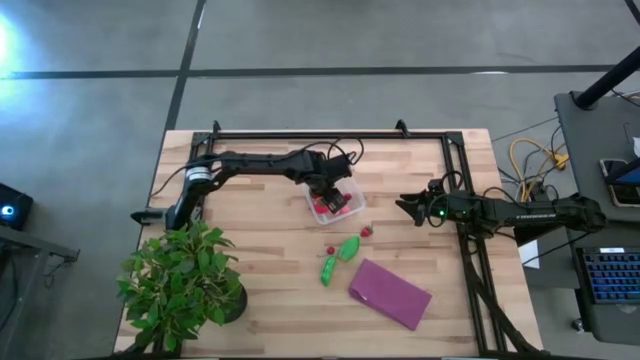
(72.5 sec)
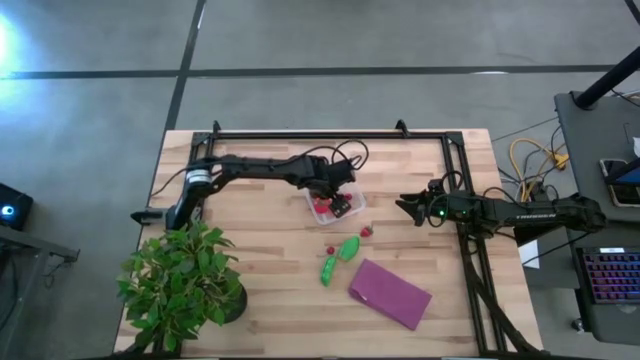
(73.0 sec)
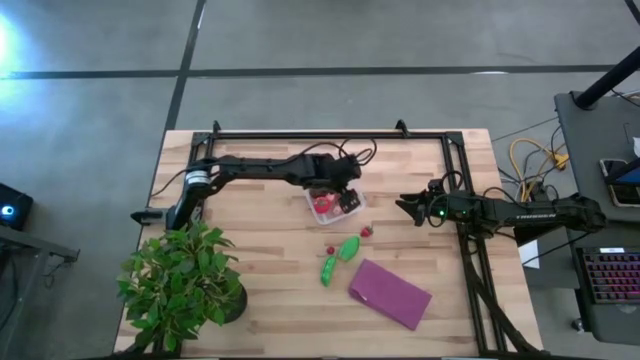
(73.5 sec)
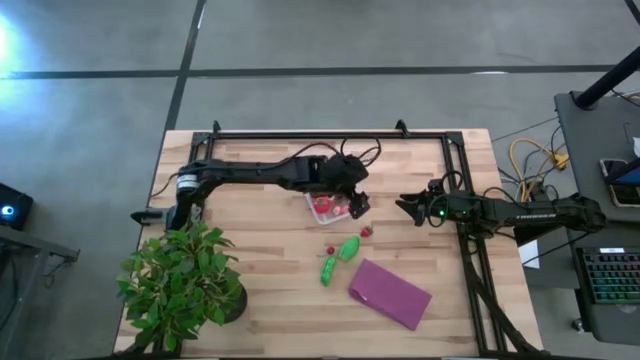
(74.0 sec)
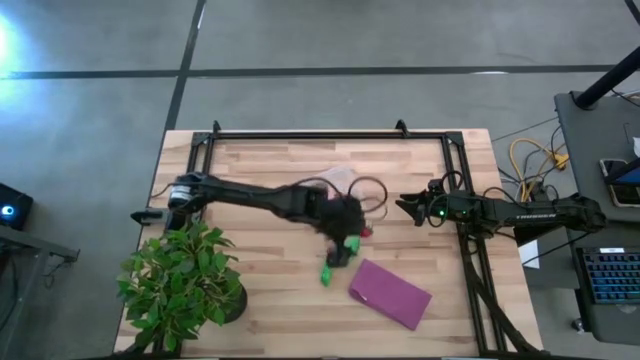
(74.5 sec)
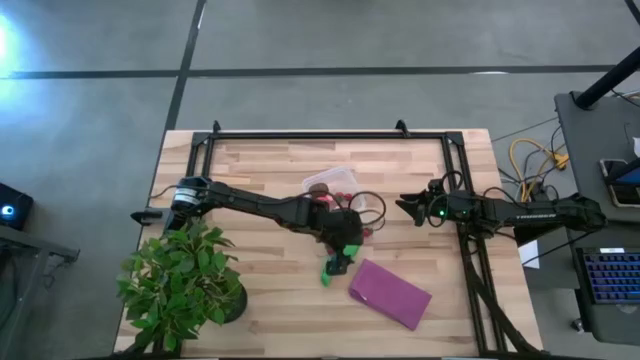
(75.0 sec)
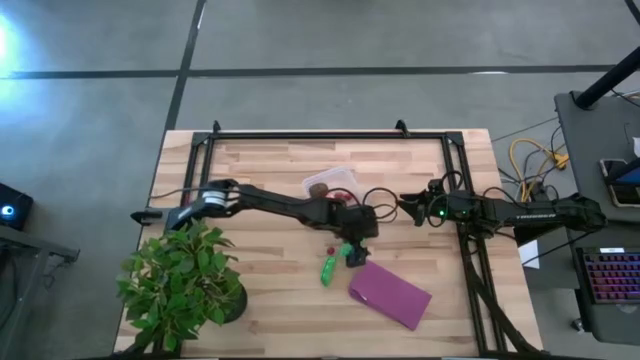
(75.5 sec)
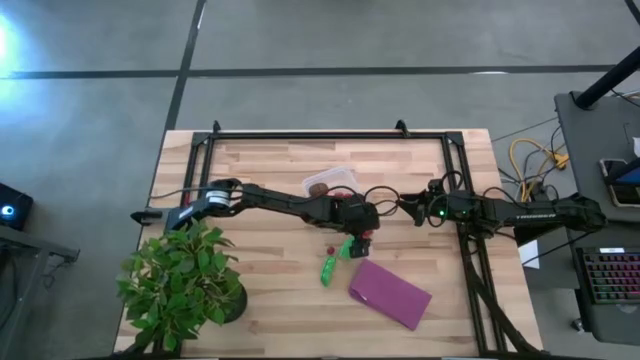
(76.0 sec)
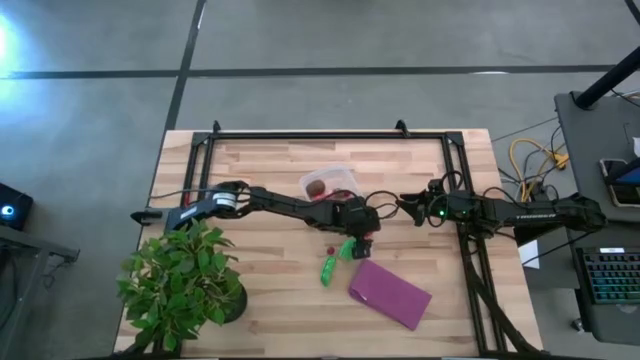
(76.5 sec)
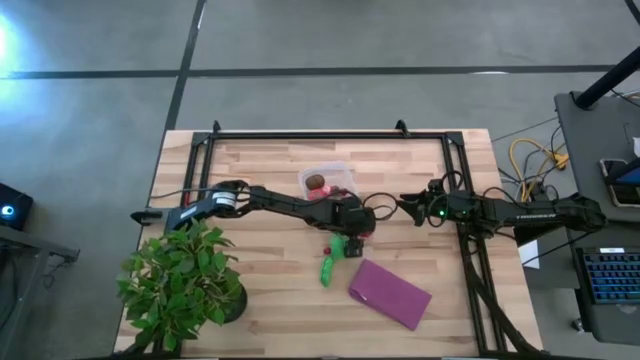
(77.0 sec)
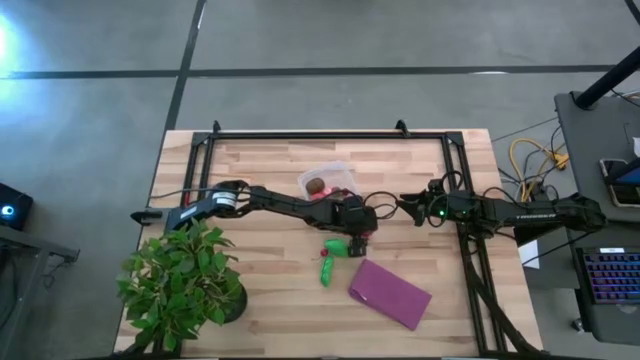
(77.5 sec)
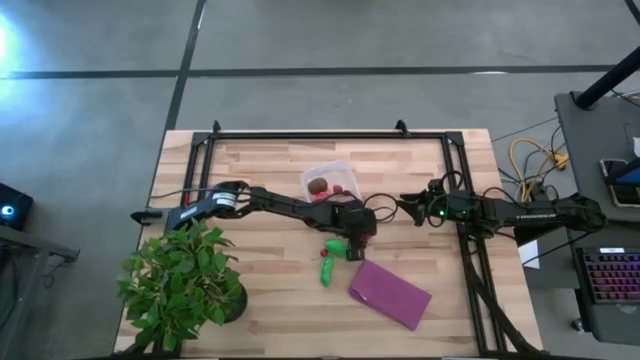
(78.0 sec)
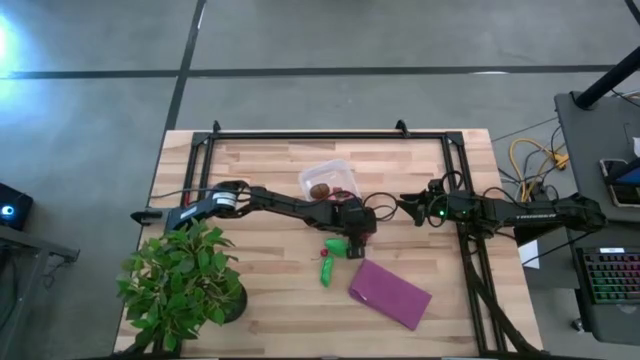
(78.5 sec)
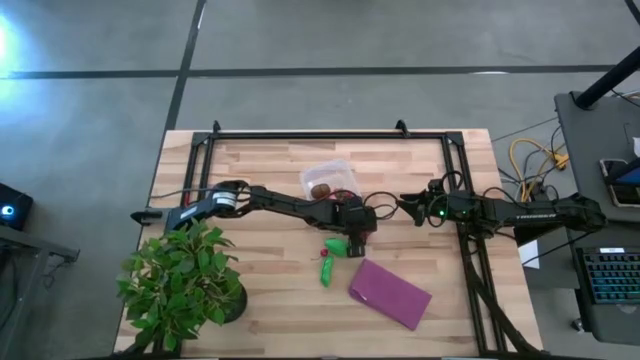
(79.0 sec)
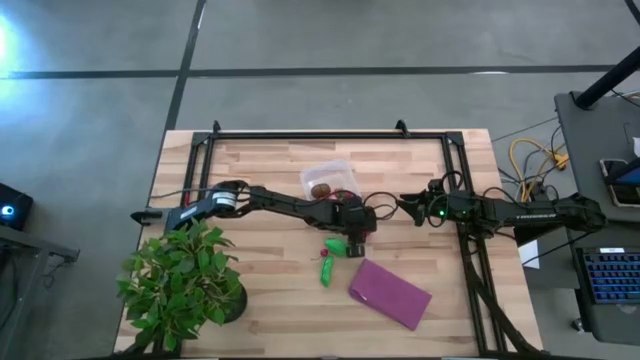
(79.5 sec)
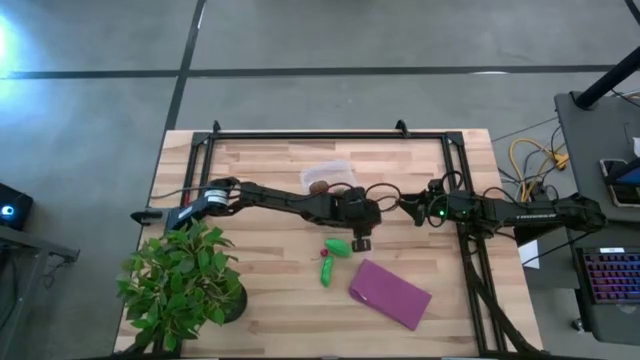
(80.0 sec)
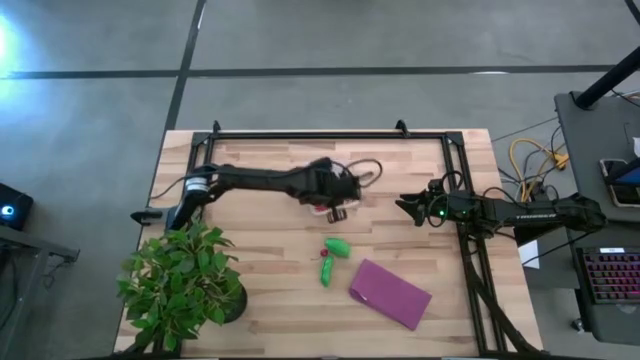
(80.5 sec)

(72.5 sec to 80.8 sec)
Task: Pick and placing Produce into tupperware
Put the red strawberry into the transparent bin

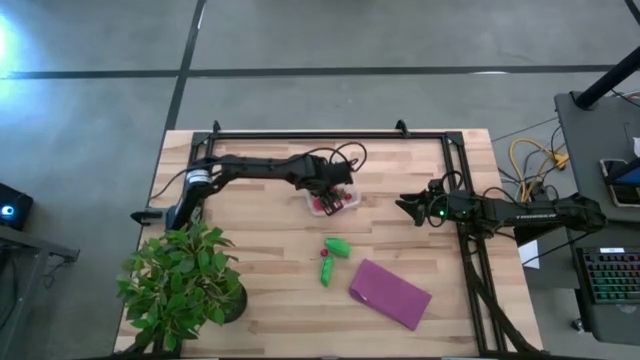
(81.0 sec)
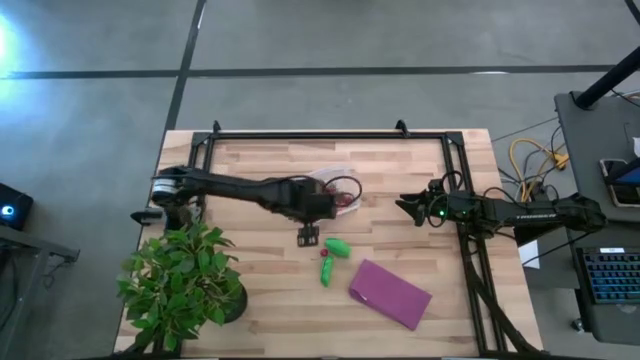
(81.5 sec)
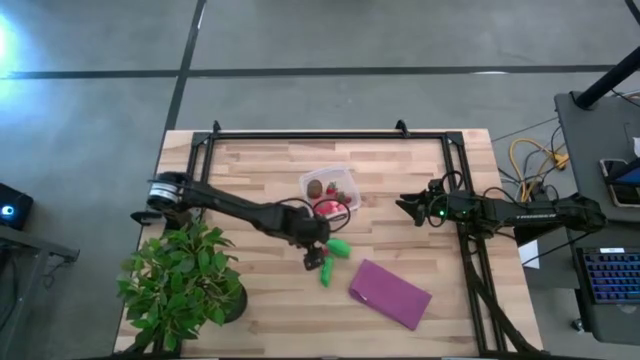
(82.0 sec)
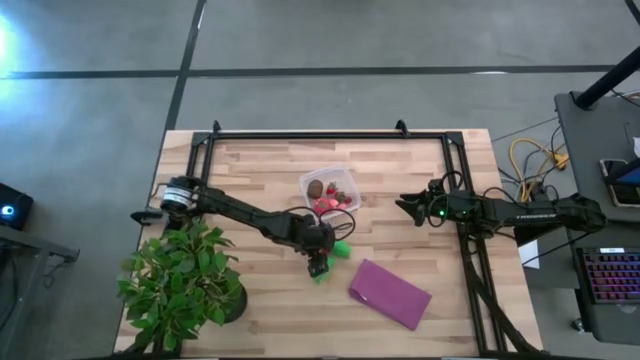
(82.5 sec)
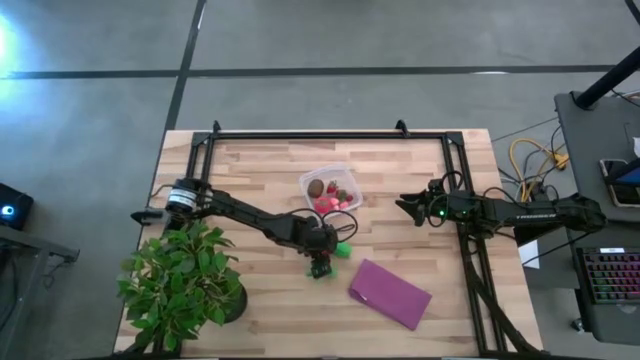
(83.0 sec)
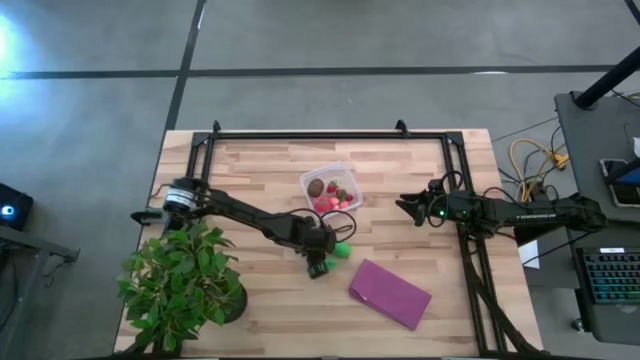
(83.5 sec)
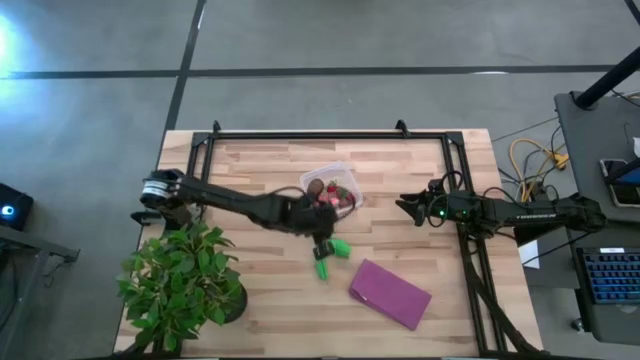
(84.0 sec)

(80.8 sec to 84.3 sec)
Put the red cherry into the transparent bin

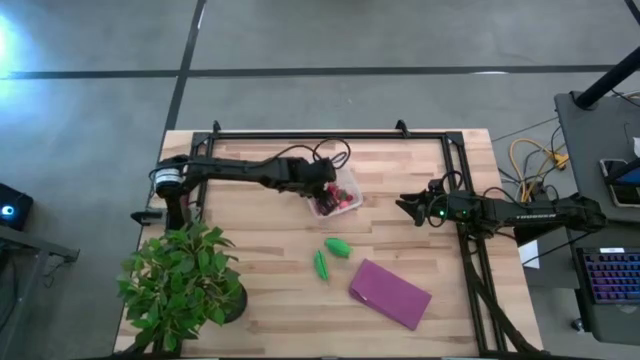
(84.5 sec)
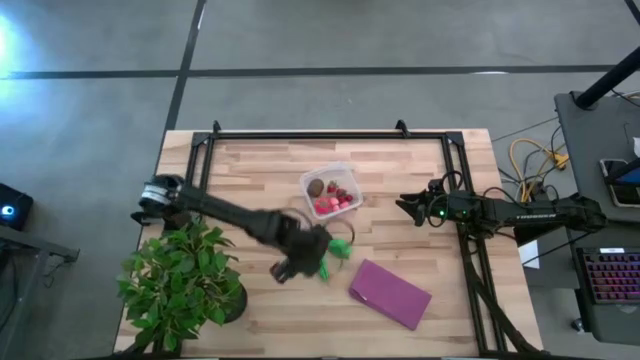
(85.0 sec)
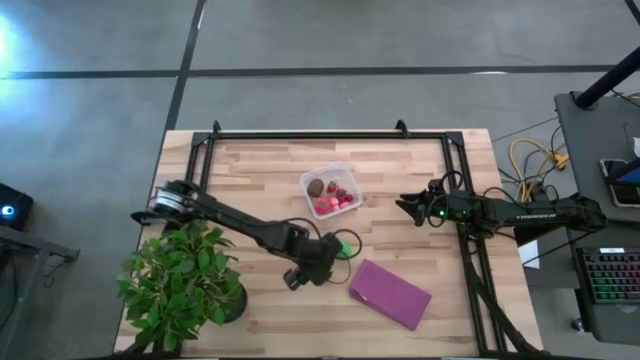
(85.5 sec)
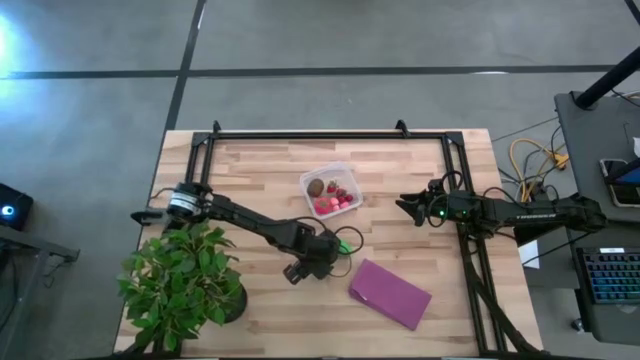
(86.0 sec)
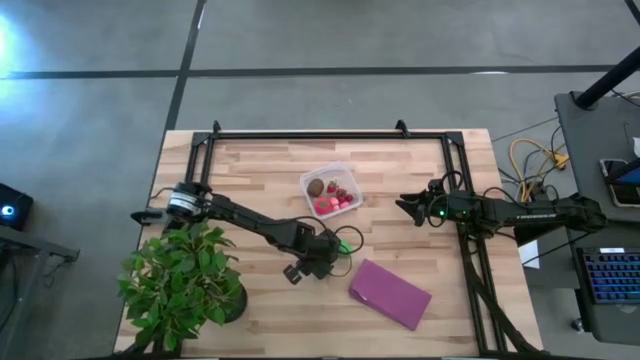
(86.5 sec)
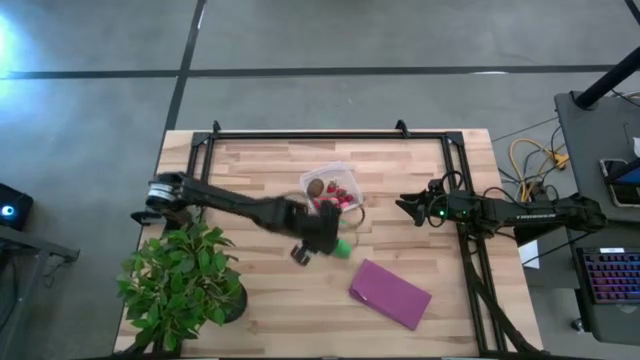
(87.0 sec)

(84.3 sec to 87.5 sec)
Put the green peas into the transparent bin

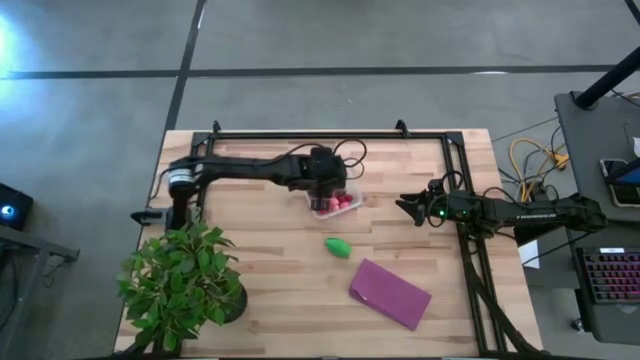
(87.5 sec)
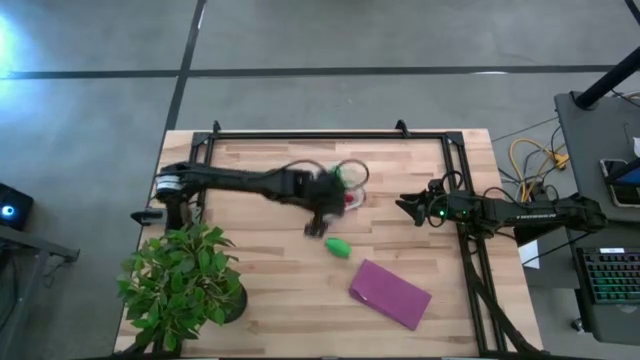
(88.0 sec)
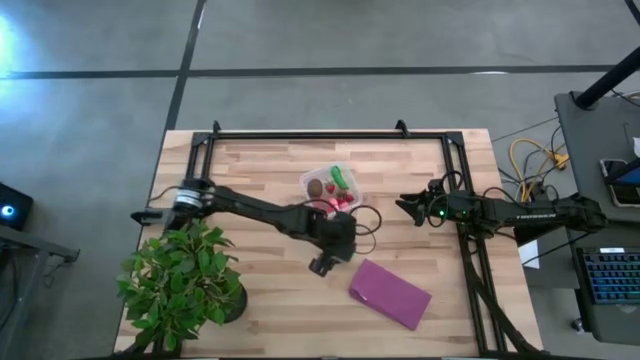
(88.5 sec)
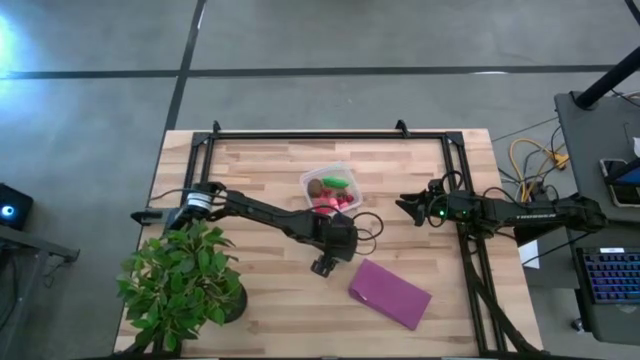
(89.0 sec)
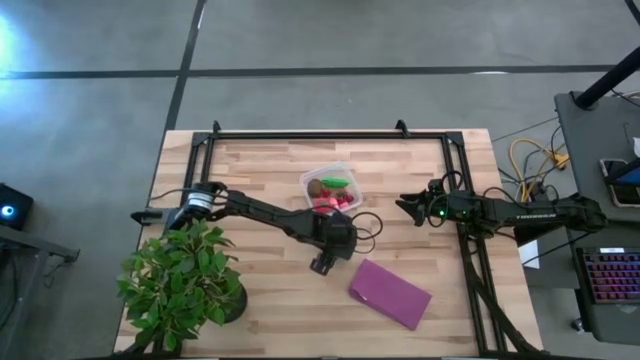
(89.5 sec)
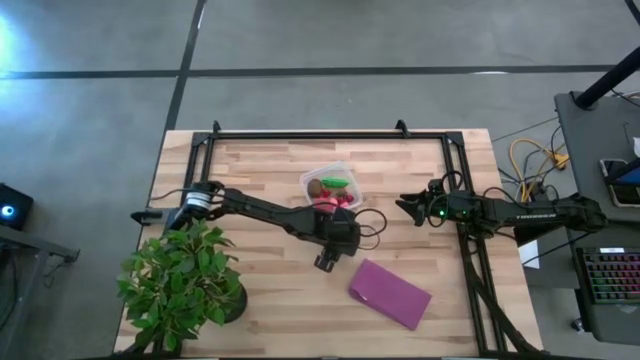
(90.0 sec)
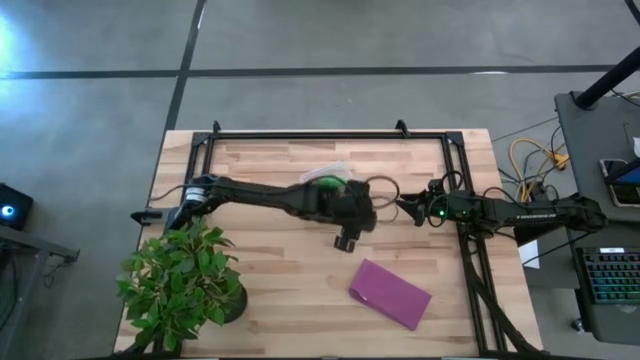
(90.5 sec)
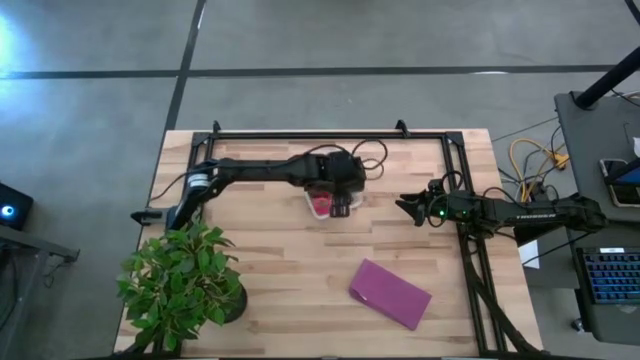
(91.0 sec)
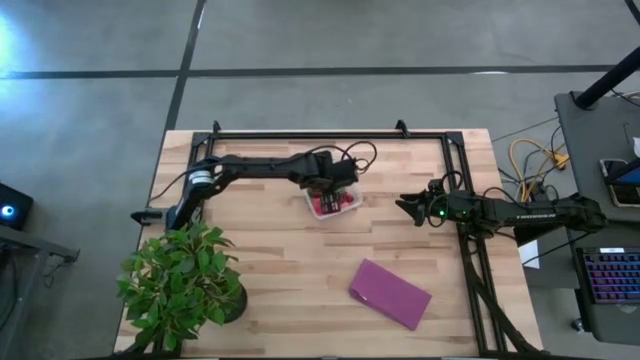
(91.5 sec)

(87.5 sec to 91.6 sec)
Put the green corn into the transparent bin

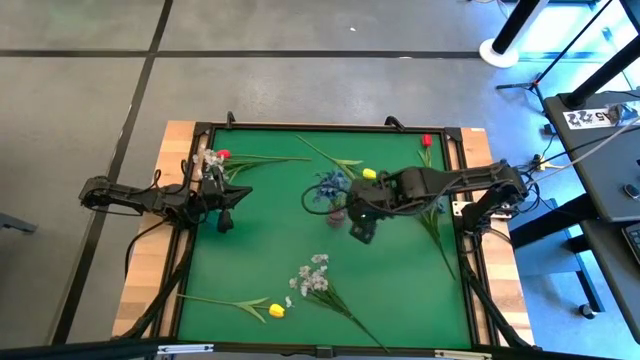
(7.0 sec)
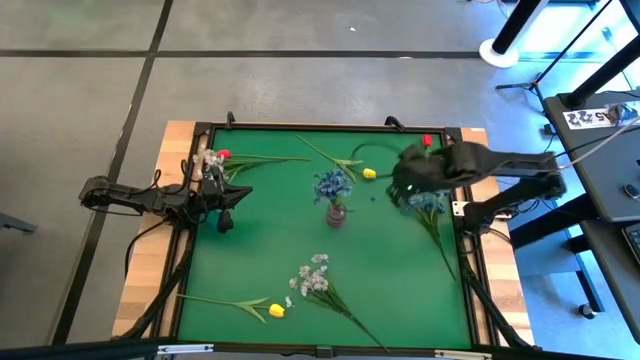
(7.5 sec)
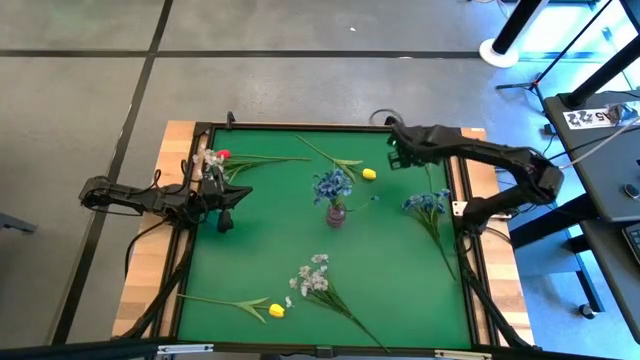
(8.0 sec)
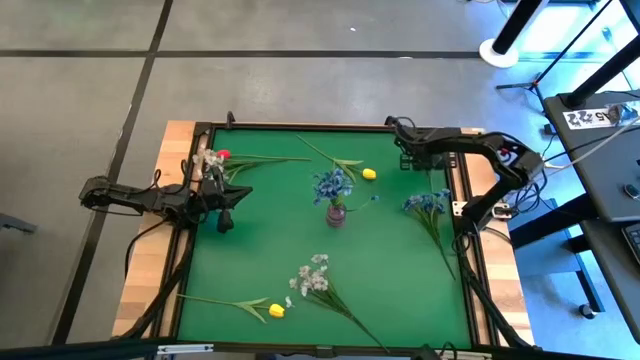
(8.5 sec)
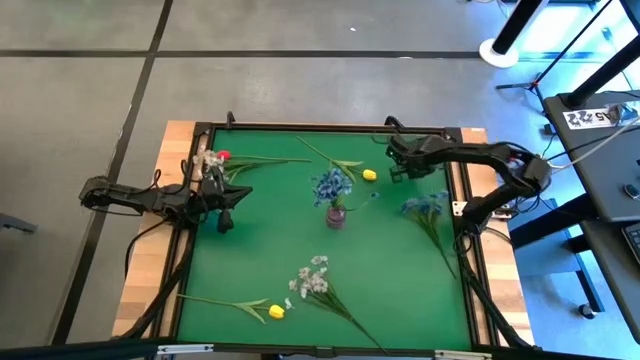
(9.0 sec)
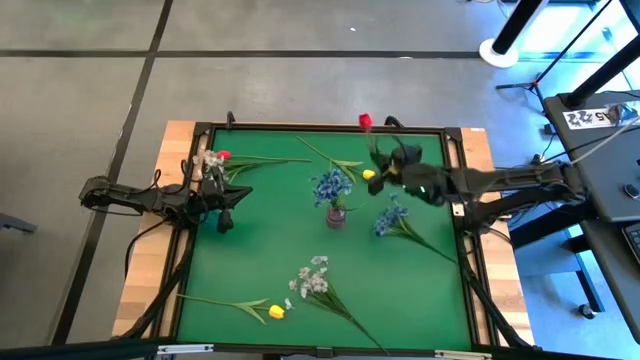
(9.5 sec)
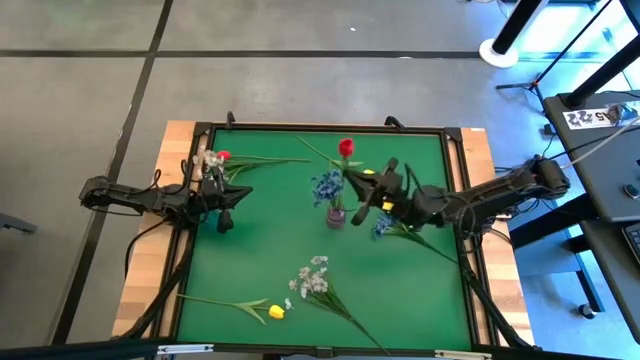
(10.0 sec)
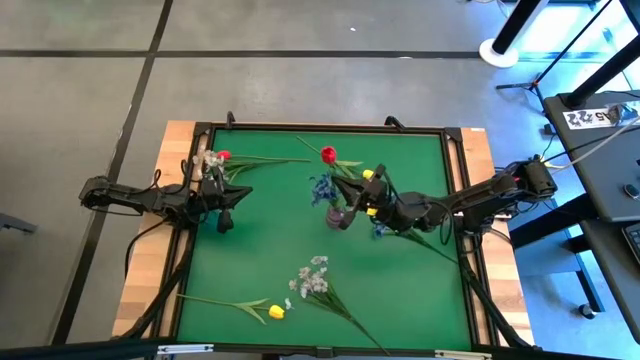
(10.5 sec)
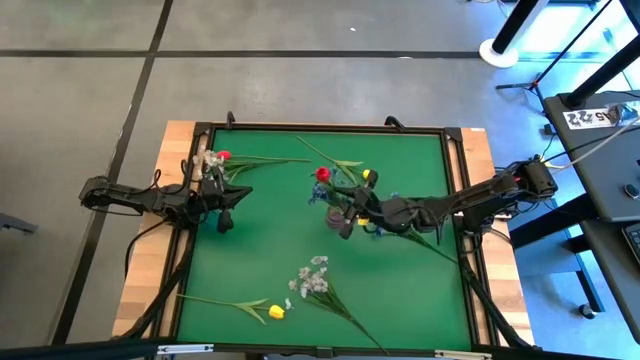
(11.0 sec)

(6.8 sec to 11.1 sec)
Task: Sort flowers into vase by color
Put the right red flower into the purple vase
